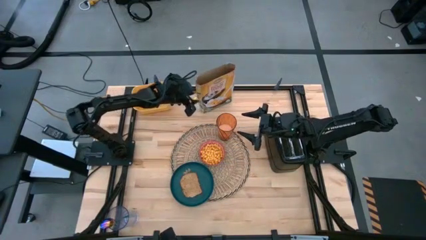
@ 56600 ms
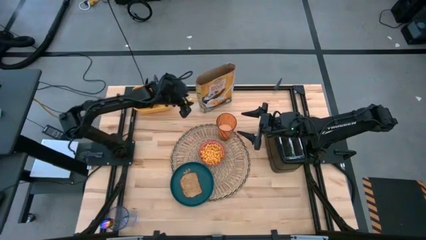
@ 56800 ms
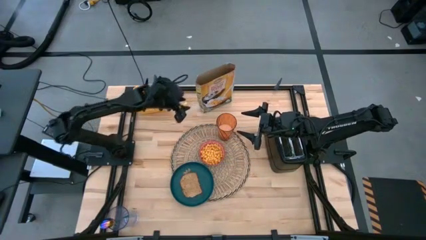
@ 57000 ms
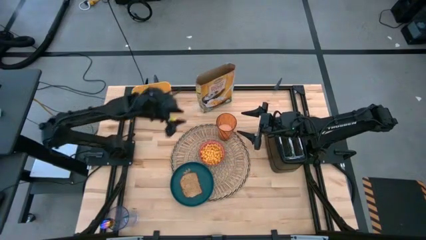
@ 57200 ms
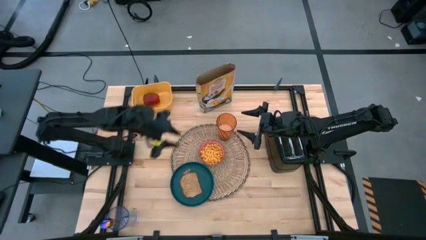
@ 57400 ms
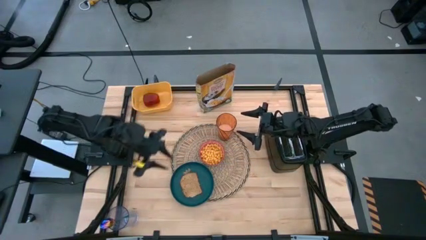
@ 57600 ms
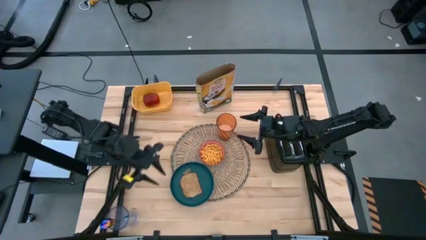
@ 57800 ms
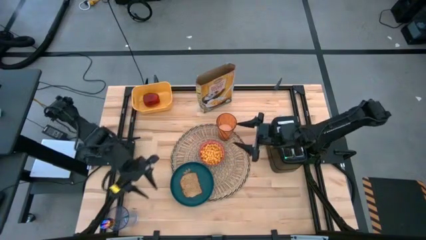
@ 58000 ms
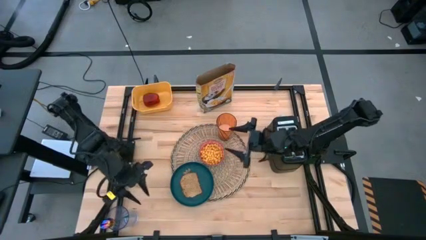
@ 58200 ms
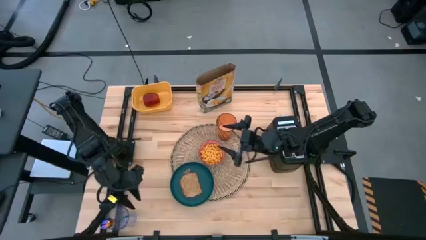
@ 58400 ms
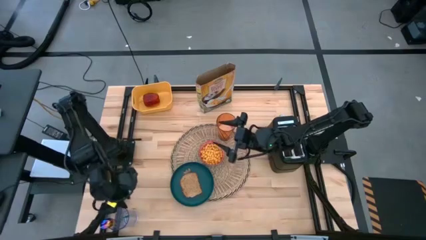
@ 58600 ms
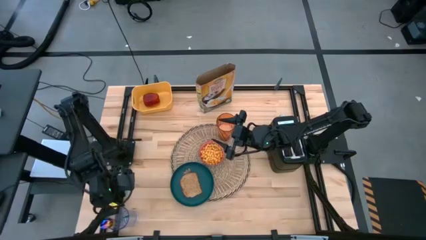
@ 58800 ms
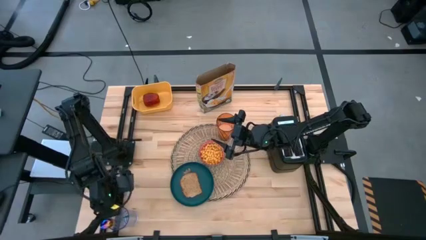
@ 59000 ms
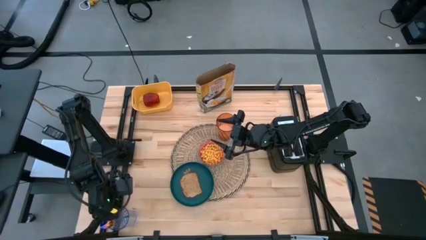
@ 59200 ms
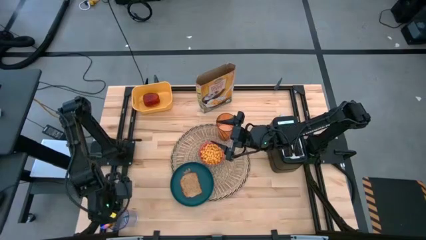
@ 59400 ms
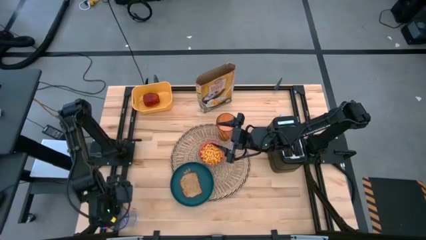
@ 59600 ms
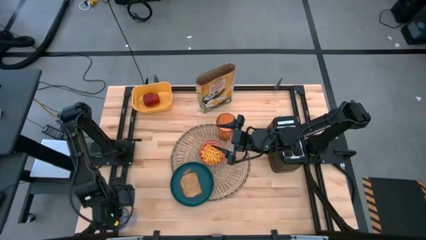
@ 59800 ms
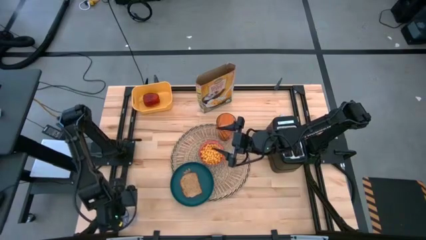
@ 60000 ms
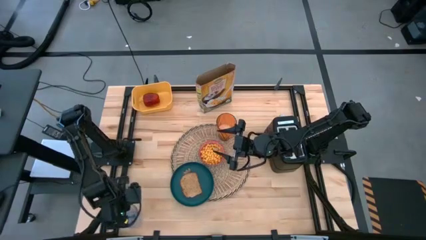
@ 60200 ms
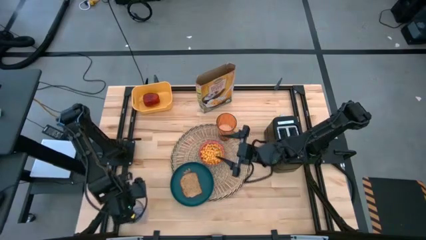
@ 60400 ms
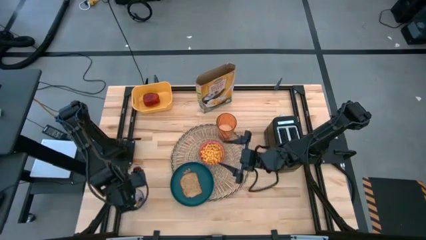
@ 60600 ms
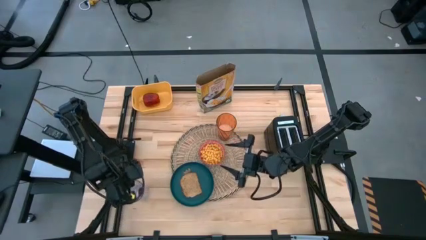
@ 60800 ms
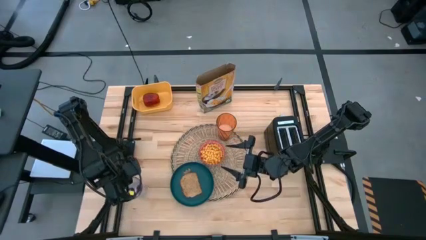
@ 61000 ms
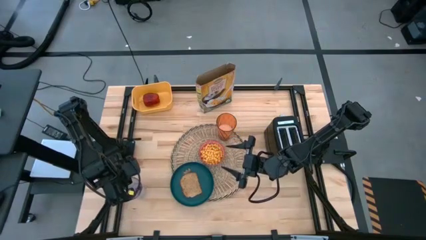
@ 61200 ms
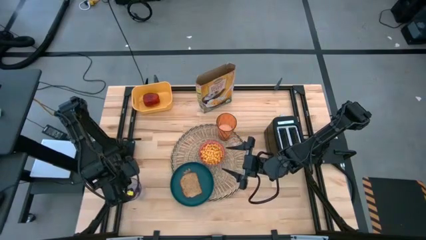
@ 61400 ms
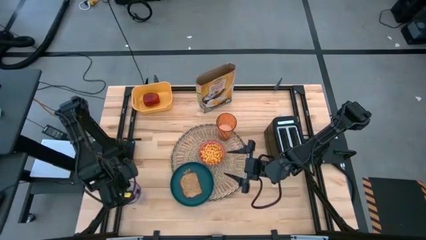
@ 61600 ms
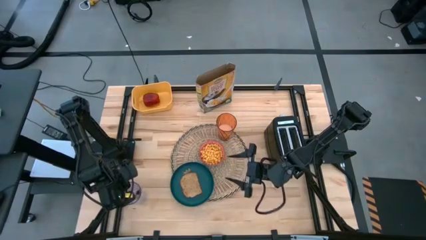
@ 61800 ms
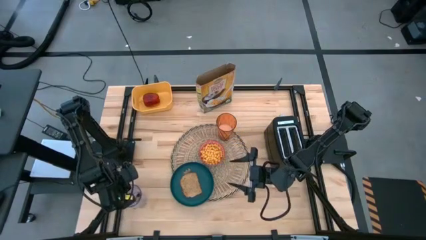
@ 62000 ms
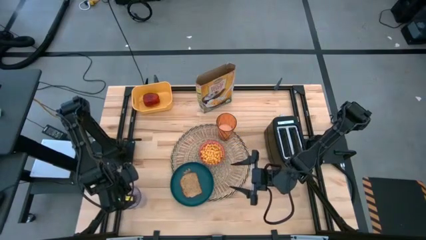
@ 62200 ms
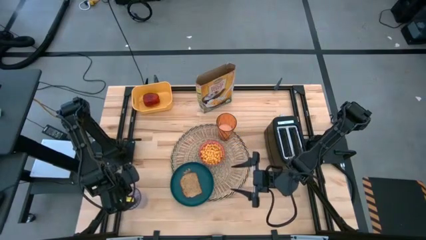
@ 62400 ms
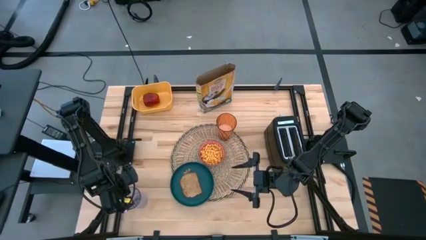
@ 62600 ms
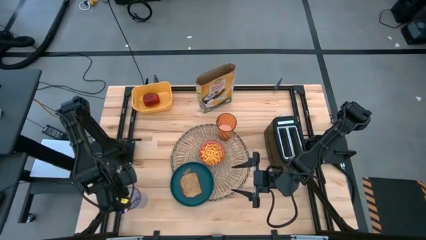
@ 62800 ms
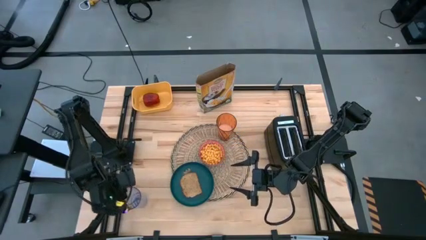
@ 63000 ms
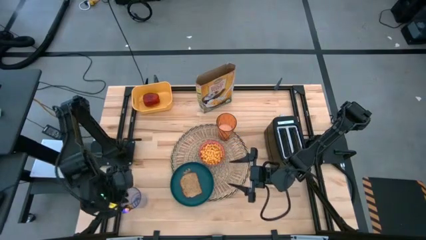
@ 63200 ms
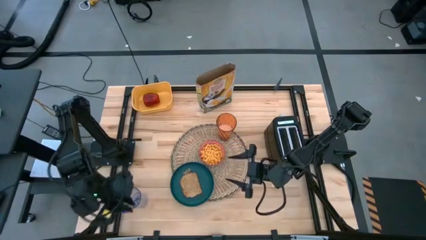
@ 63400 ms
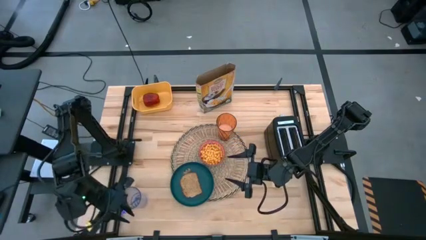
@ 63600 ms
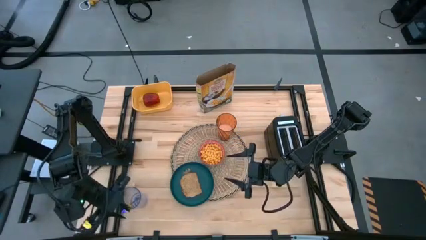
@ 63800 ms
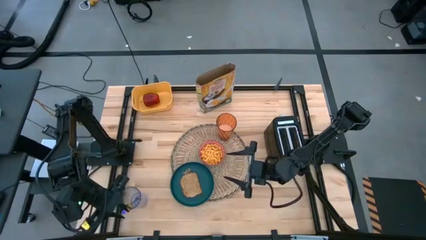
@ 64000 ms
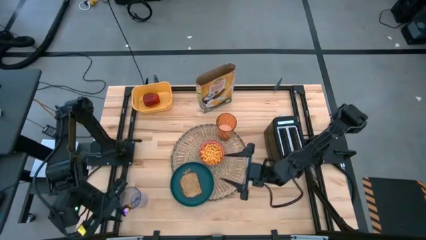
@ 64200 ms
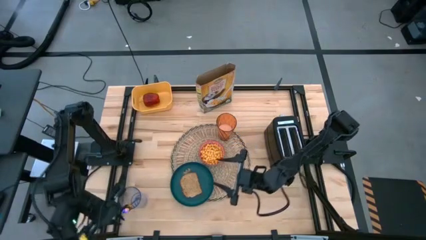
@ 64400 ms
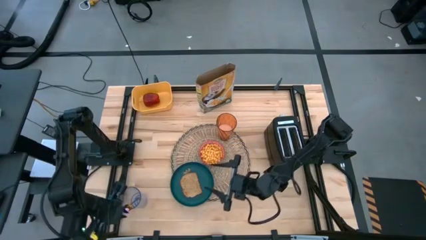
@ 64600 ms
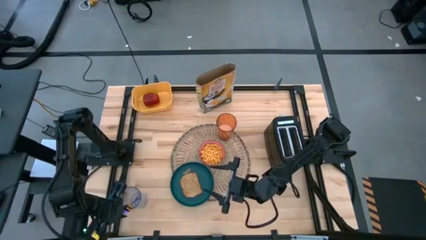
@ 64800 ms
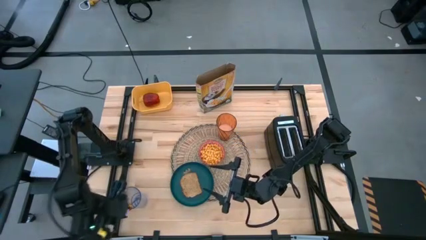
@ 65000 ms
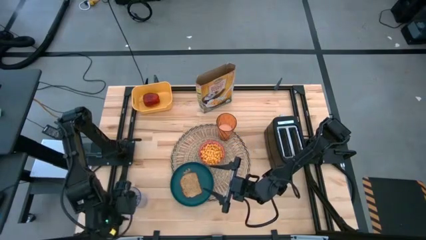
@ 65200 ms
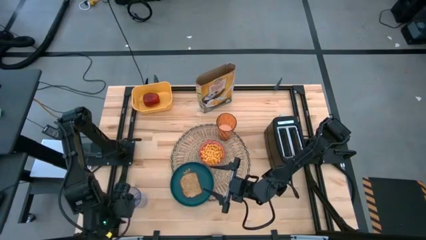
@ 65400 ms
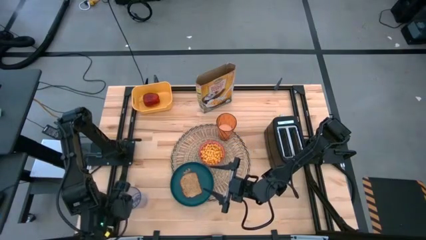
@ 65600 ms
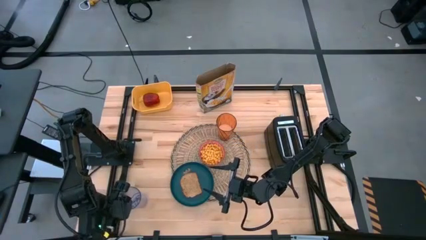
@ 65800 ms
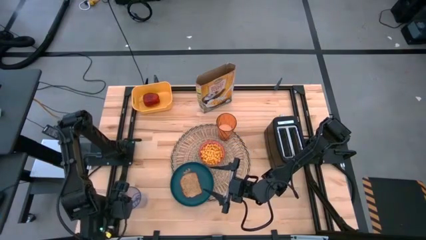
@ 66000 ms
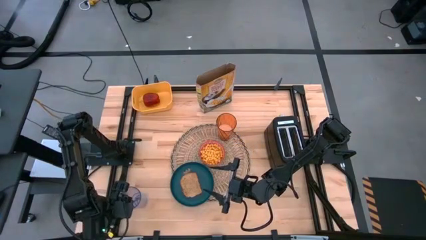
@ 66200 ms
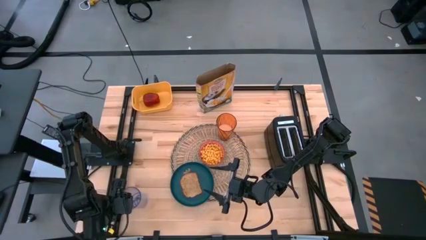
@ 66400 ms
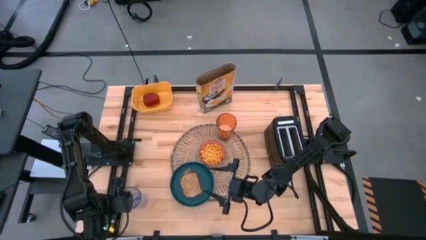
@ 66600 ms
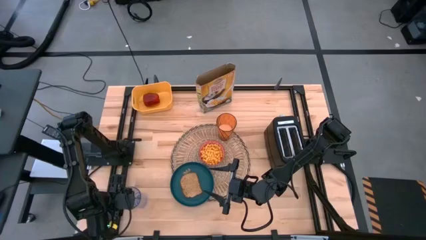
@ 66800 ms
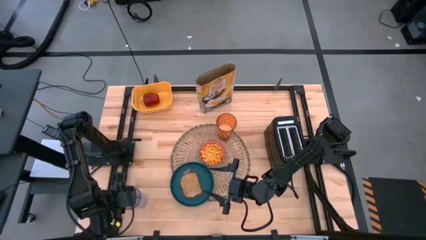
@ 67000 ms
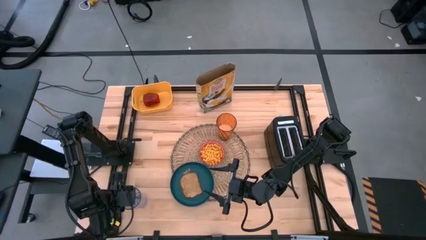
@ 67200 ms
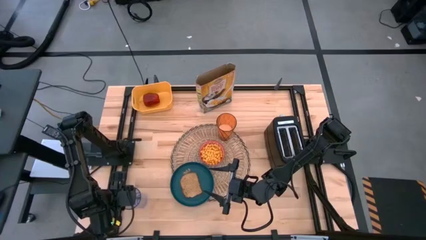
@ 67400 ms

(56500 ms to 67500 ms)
Task: Arrange a breakfast setting
Put the violet spoon on the placemat to the right of the red bowl
